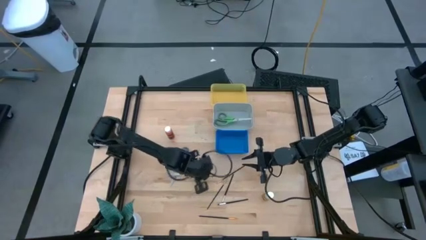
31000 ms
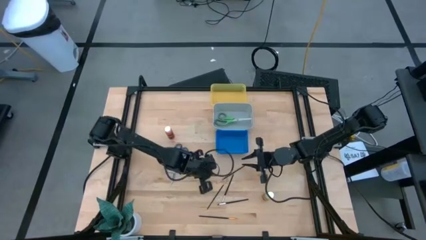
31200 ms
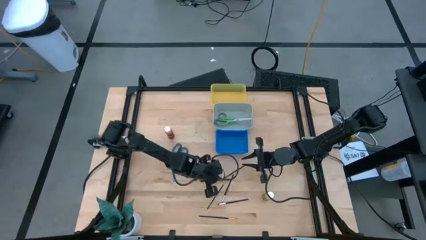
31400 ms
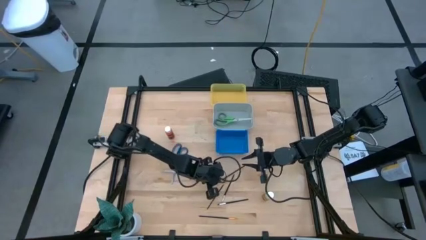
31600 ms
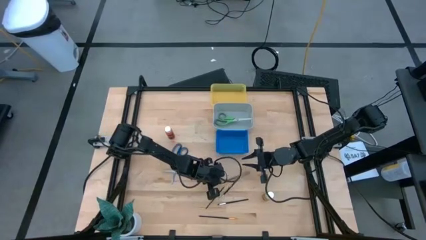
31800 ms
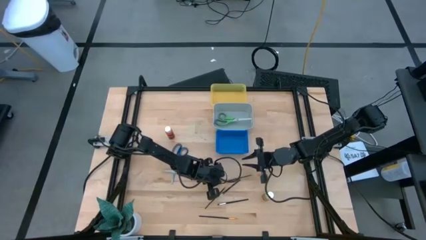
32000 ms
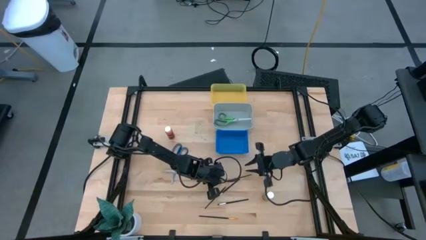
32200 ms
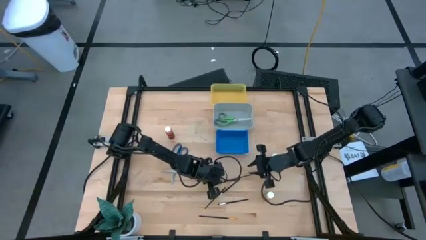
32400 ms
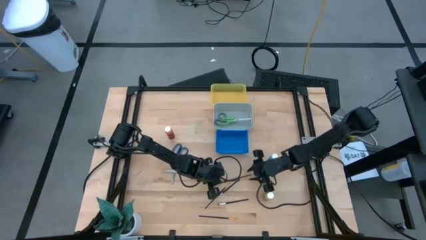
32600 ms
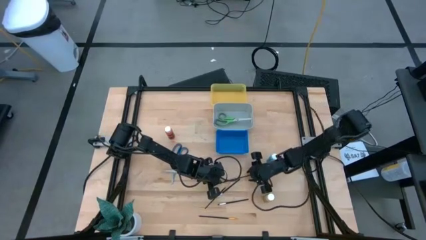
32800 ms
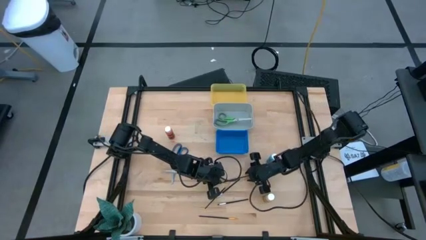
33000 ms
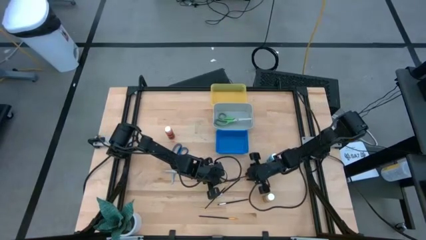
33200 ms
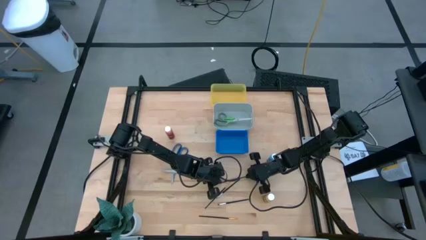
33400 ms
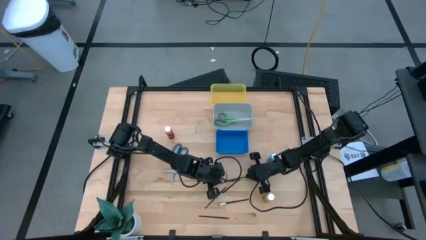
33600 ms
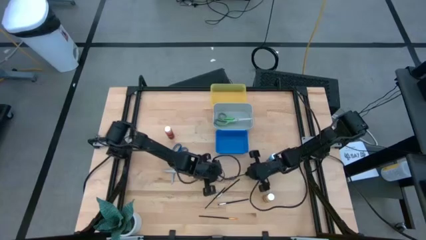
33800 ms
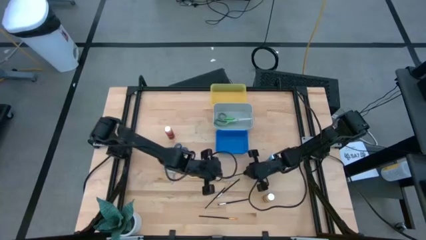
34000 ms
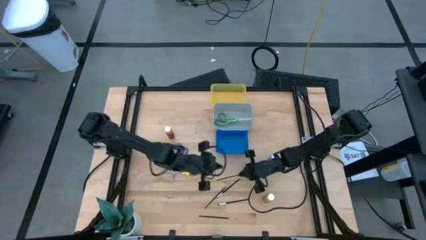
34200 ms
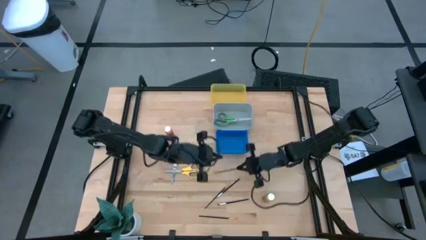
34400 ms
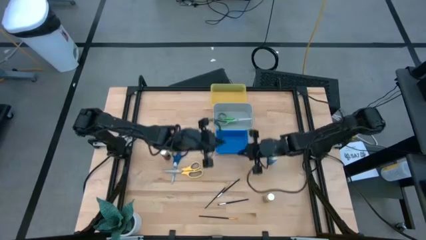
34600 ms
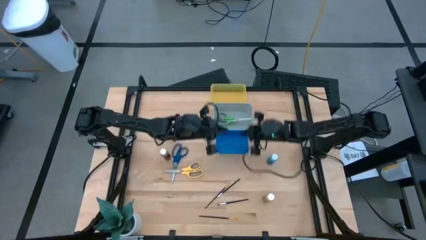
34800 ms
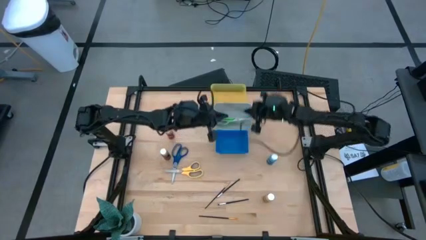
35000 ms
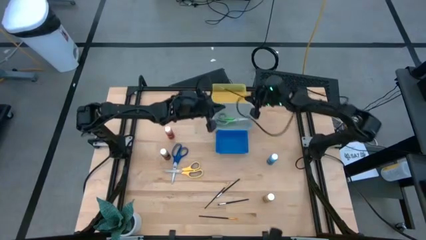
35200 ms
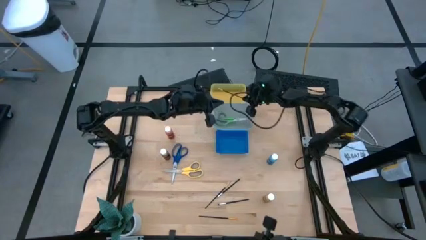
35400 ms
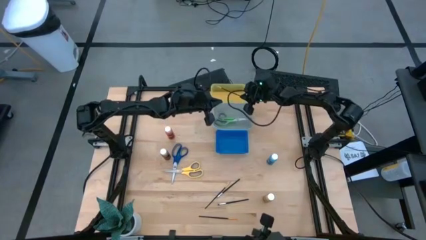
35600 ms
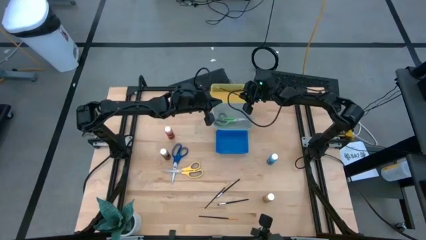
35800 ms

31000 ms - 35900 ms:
Task: Pick & Place Paint Supplies
Put the top gold paint brush into the yellow bin

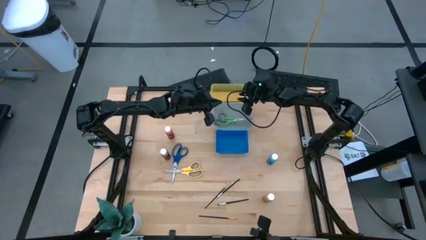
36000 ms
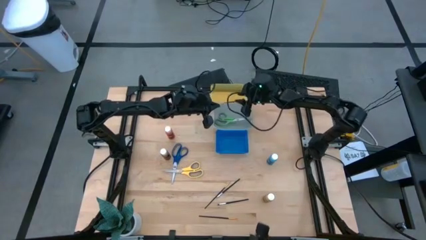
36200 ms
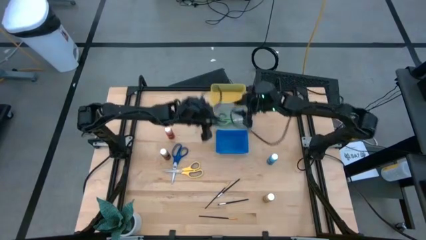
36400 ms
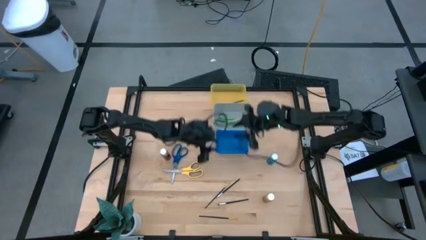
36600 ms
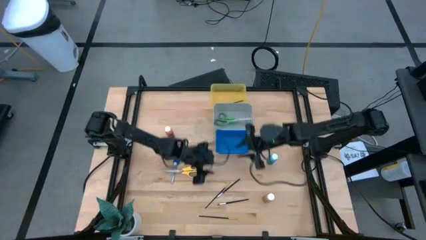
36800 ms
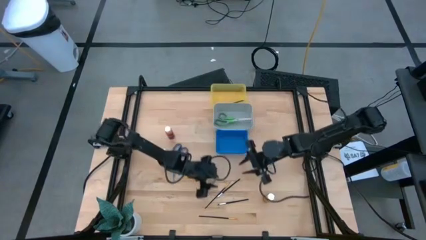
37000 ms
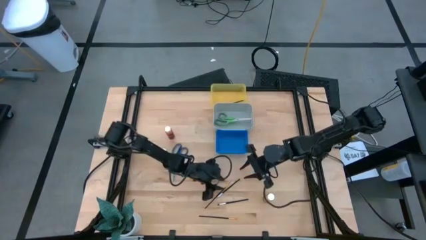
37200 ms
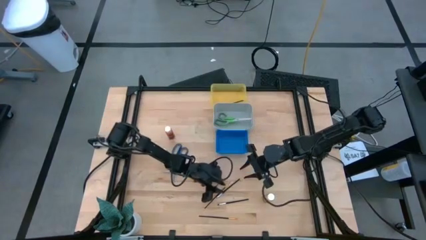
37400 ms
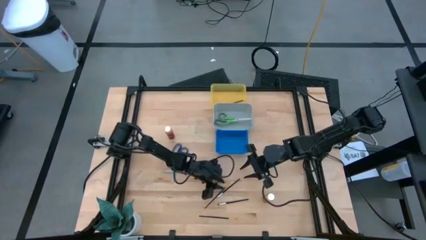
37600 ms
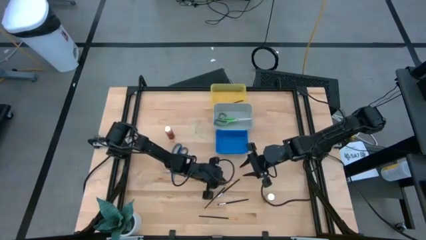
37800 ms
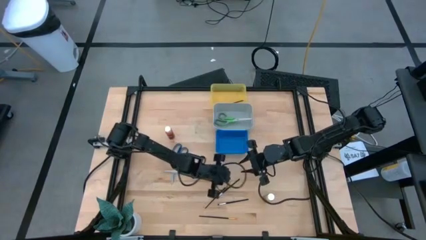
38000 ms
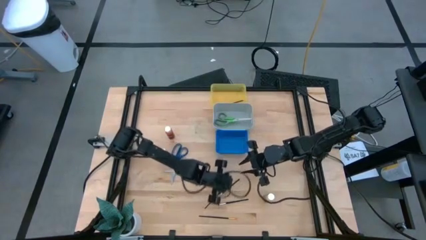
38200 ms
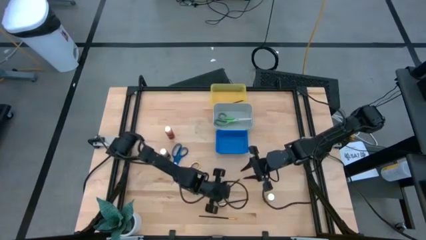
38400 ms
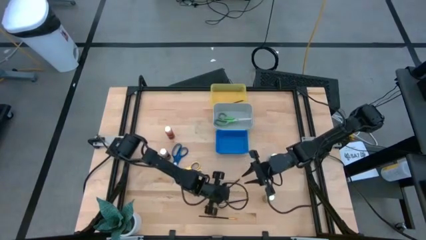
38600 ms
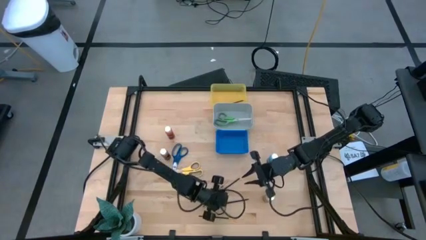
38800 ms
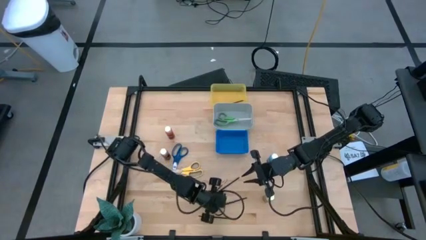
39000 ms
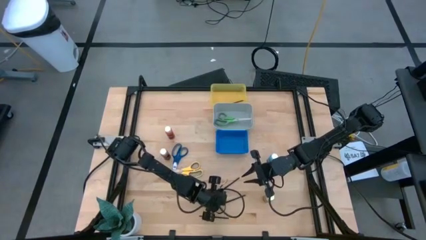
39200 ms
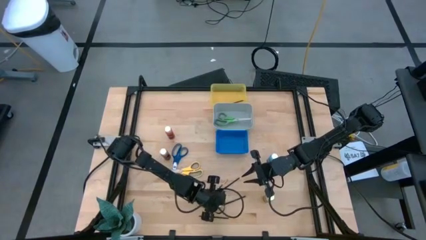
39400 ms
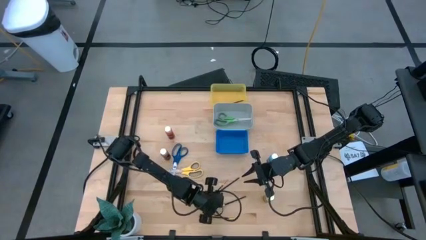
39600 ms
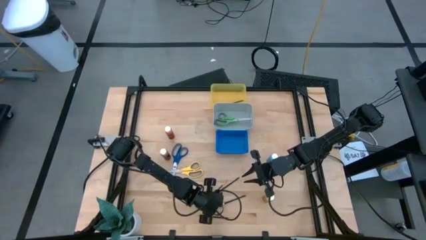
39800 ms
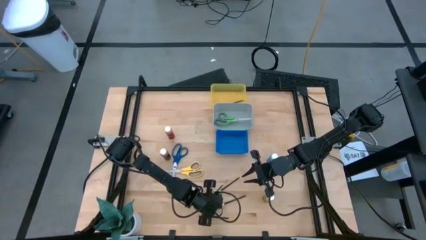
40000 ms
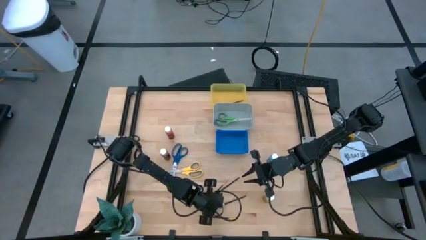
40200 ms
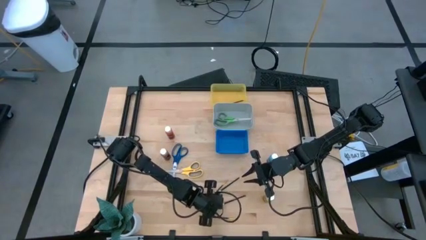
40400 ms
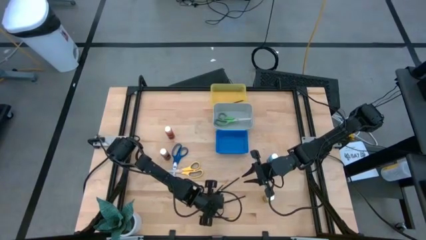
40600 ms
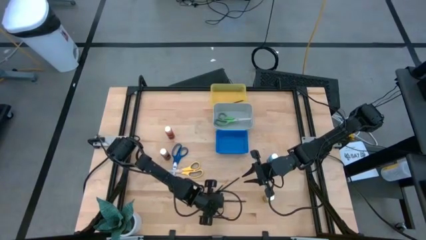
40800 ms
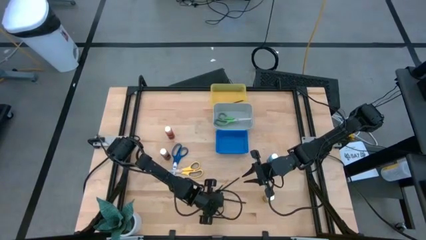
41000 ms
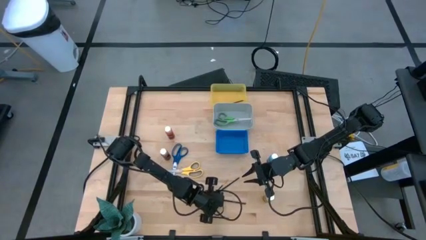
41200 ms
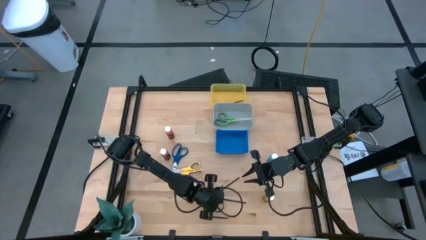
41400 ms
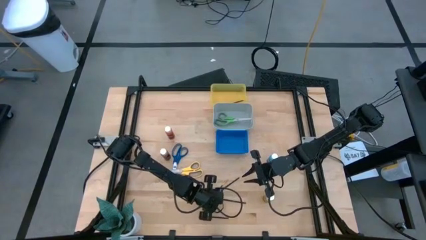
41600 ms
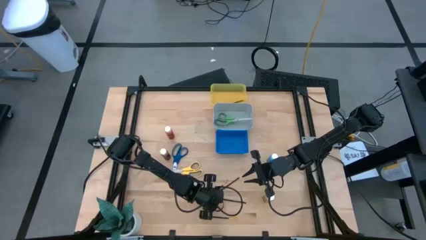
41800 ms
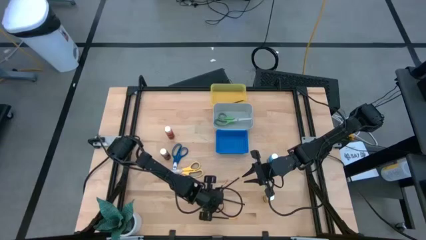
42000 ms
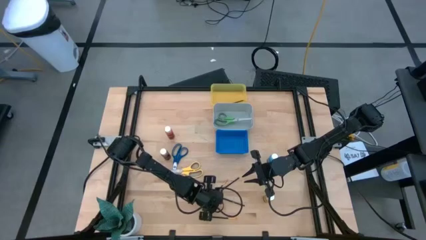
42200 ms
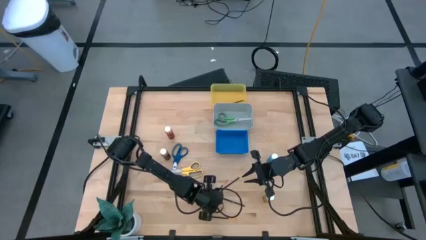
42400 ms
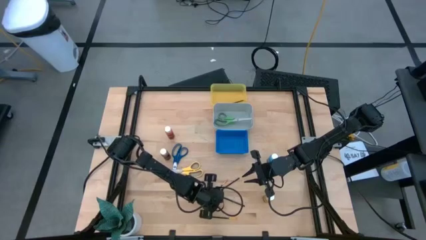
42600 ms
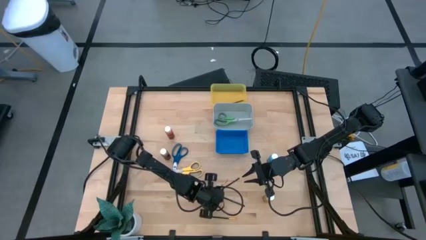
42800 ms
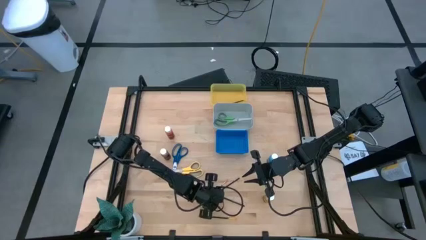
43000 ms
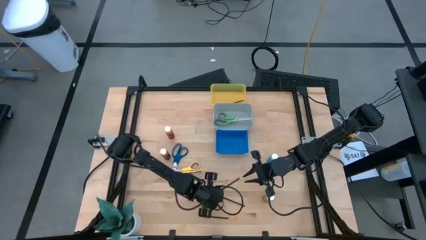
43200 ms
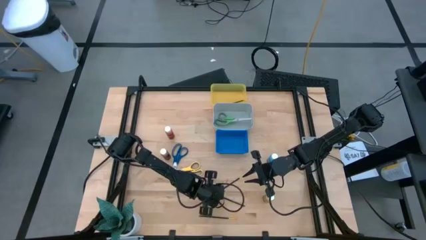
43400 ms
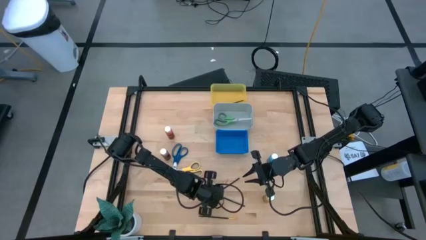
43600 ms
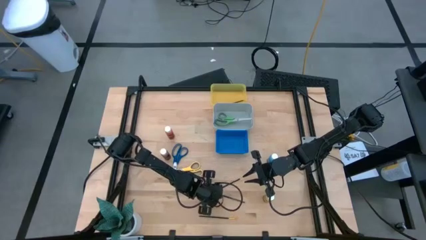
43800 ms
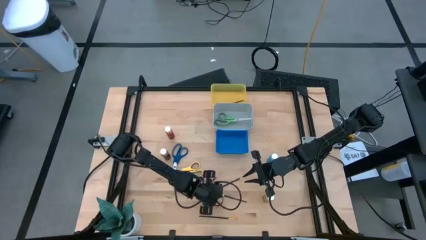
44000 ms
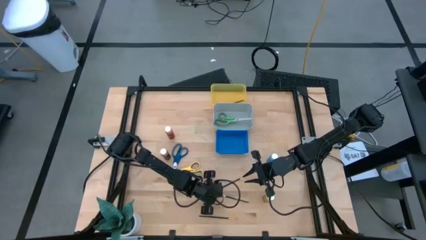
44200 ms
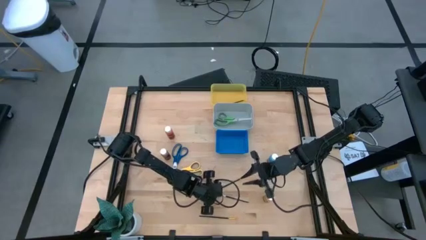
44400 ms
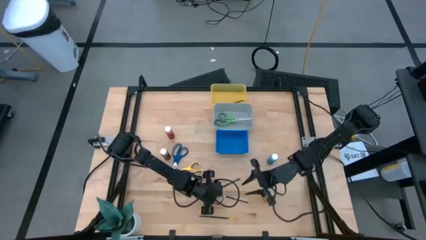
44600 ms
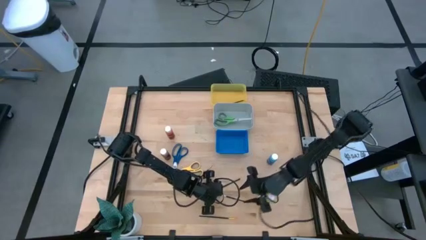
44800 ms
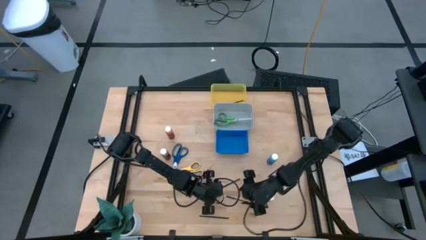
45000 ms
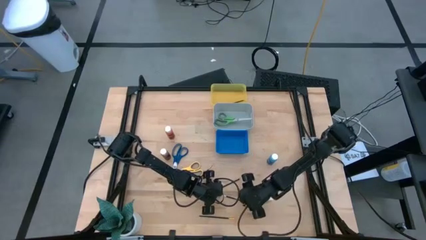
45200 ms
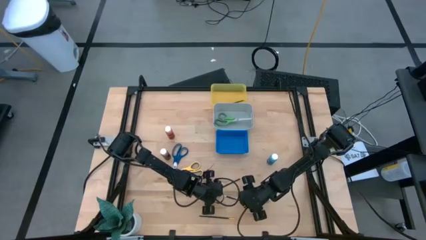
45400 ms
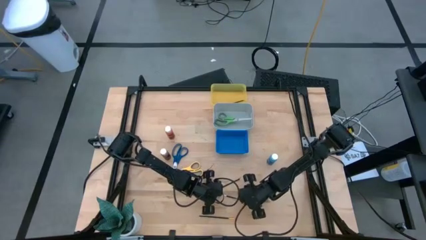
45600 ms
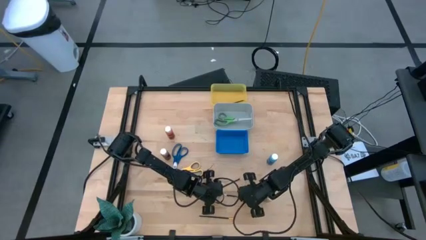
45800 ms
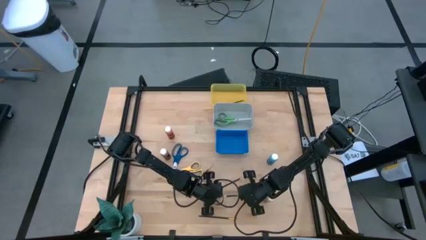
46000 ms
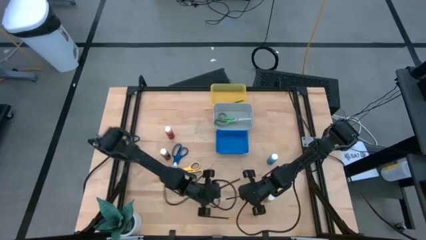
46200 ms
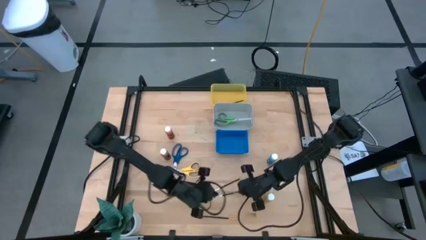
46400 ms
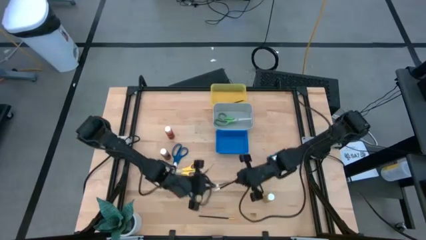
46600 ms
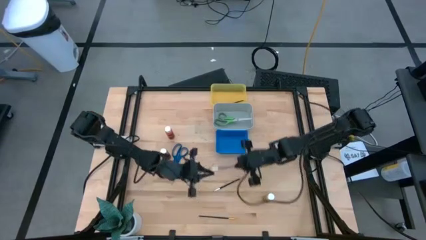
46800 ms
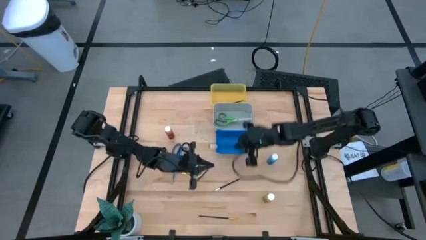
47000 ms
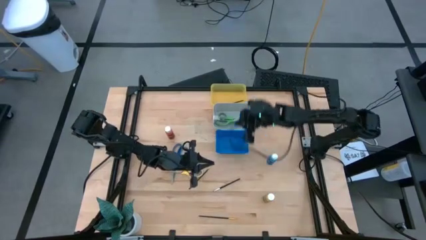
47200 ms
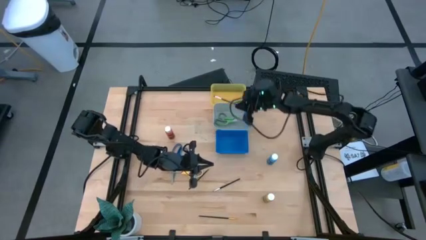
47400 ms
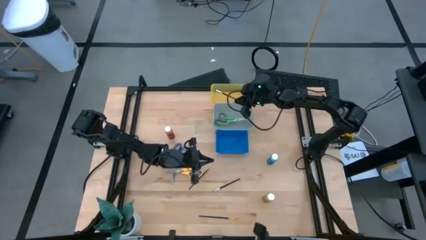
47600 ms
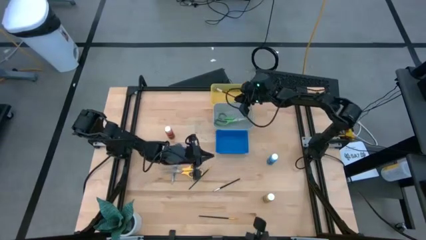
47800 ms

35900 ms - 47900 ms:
Put the bottom silver paint brush into the yellow bin
